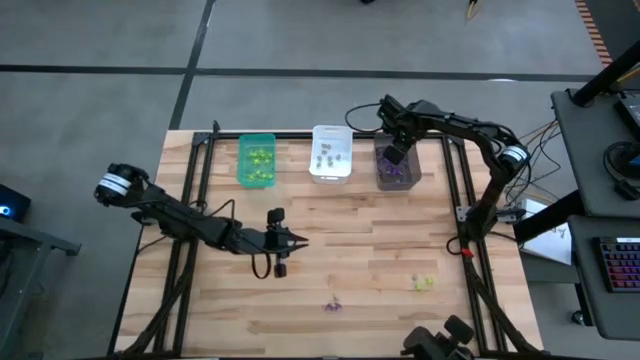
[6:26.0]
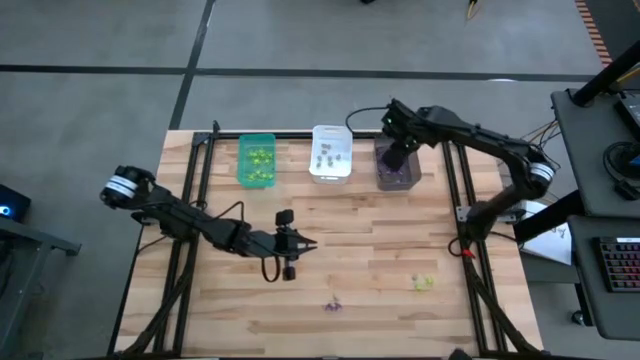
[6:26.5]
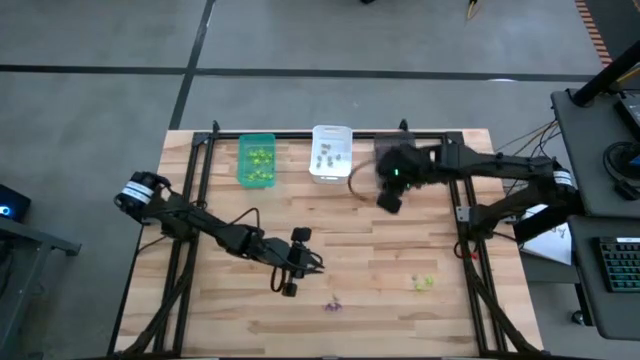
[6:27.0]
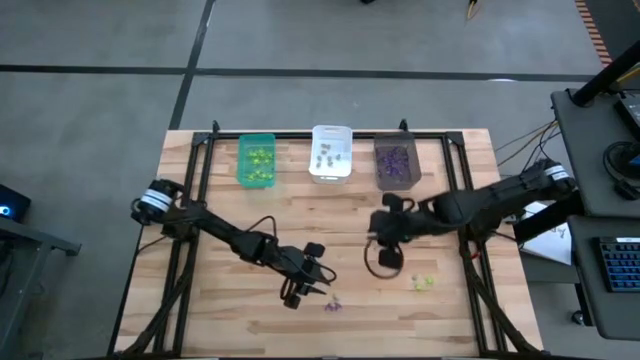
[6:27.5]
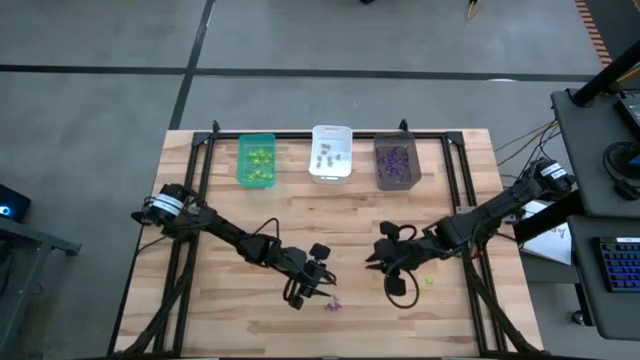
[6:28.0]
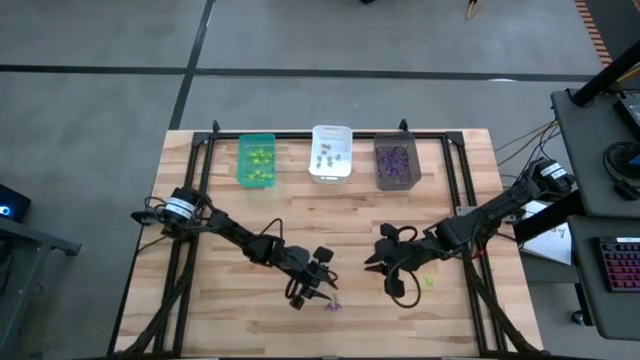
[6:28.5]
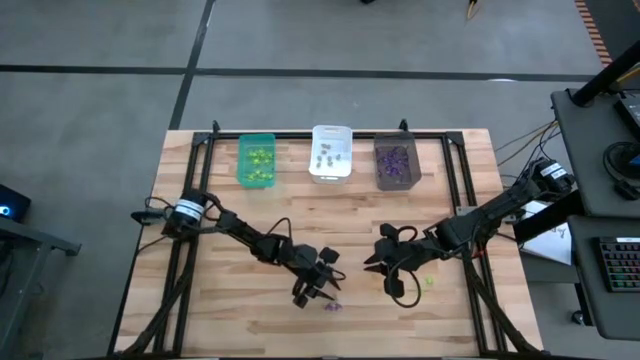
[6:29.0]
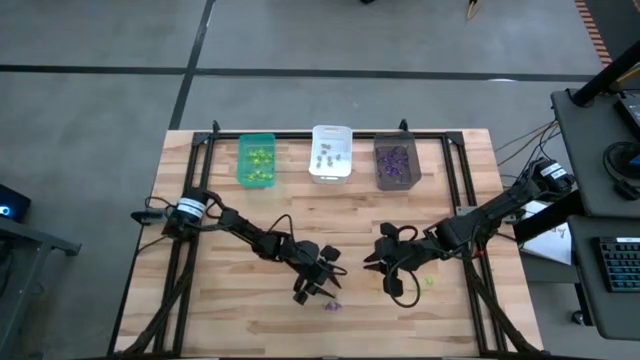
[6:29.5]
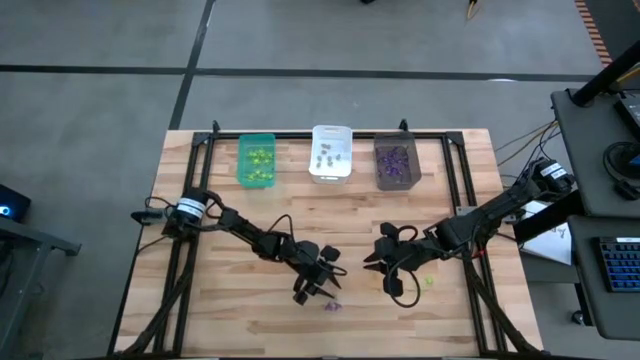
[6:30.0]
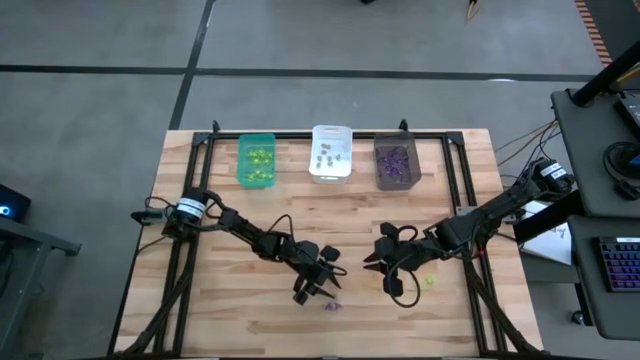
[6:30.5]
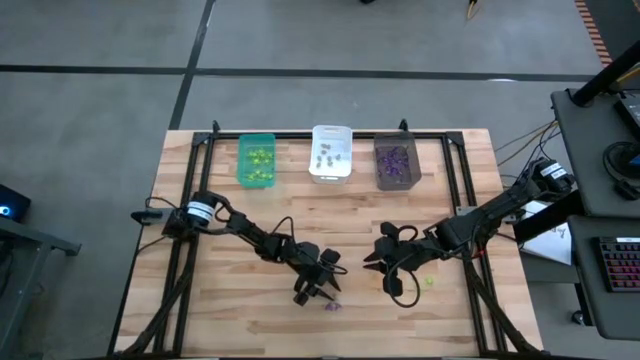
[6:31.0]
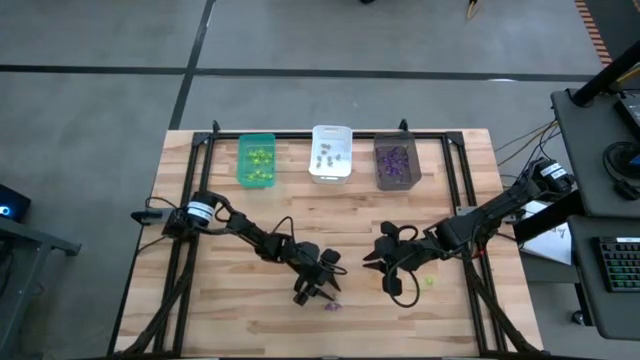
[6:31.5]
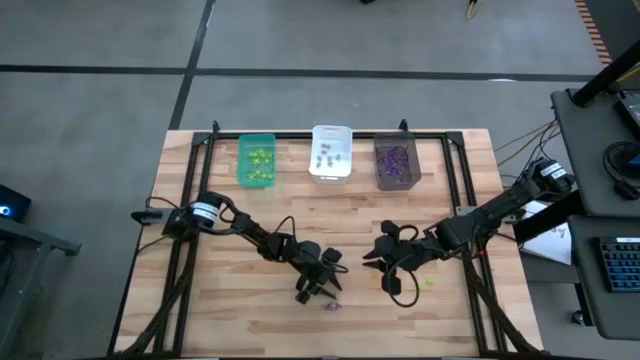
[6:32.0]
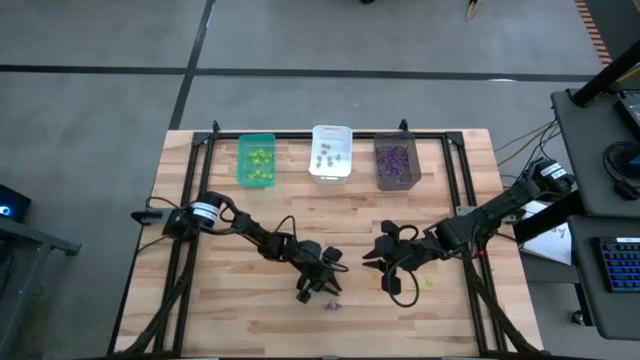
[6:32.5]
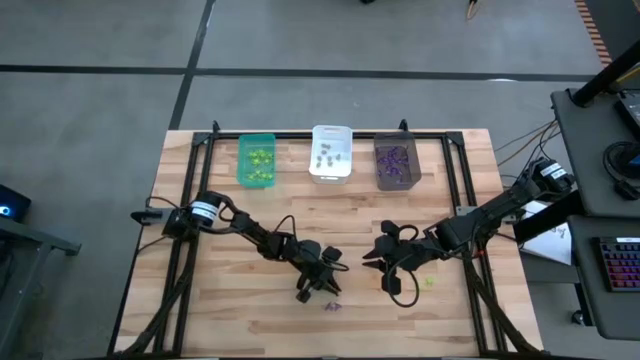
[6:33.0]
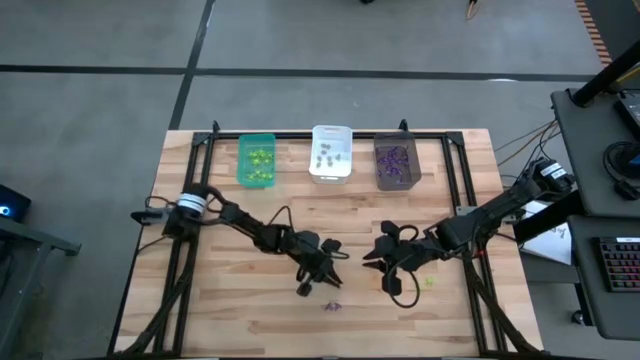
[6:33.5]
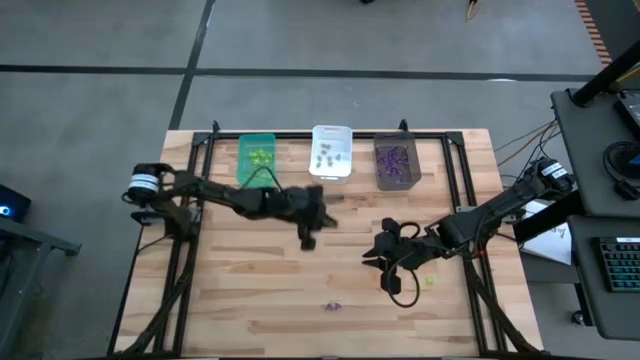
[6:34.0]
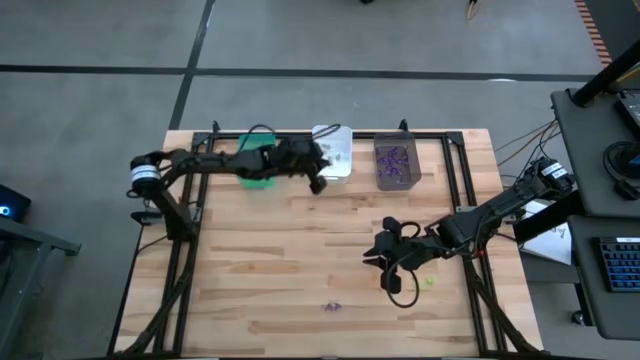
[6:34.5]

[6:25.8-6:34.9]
Task: Sort Halloween decoration
Put the white skull toy into the white bin

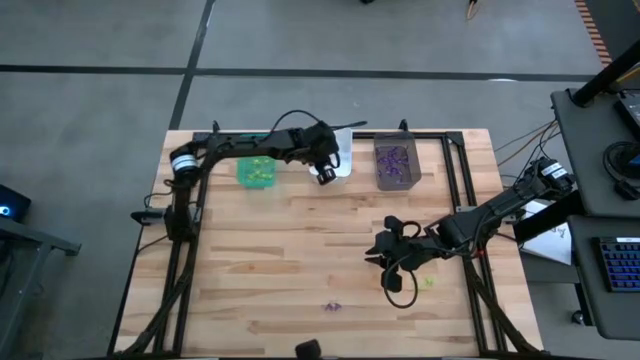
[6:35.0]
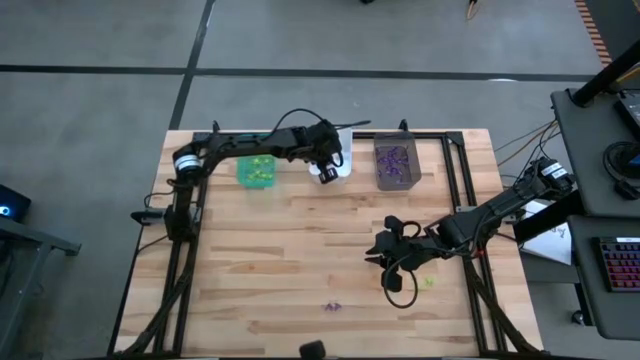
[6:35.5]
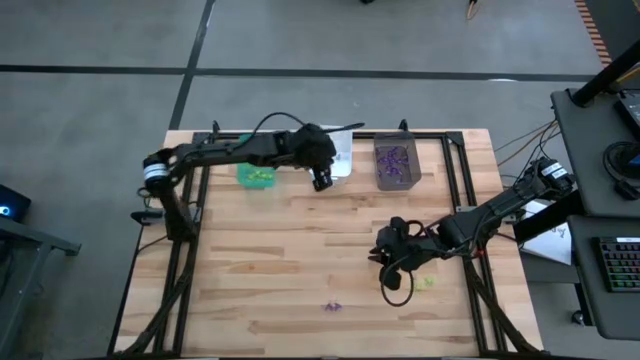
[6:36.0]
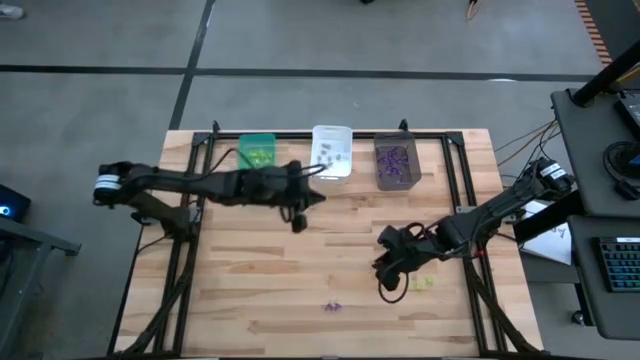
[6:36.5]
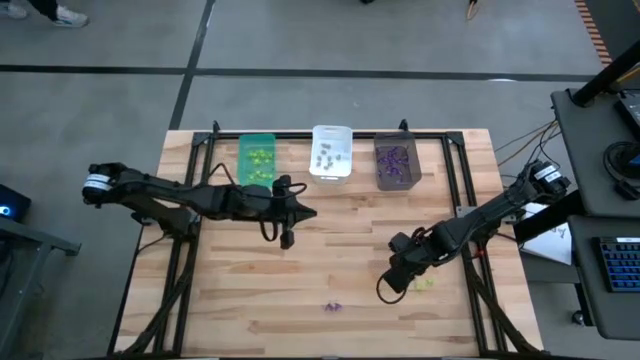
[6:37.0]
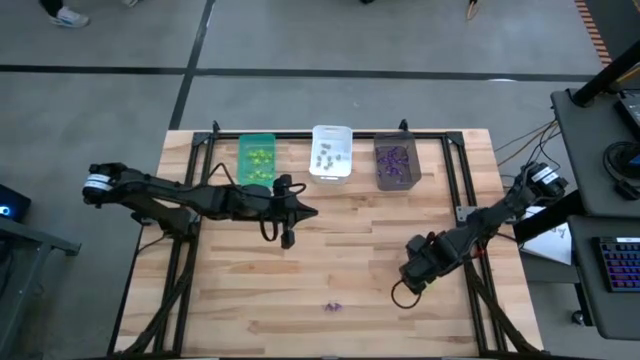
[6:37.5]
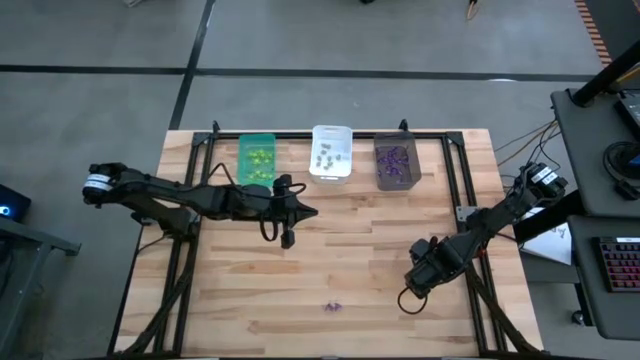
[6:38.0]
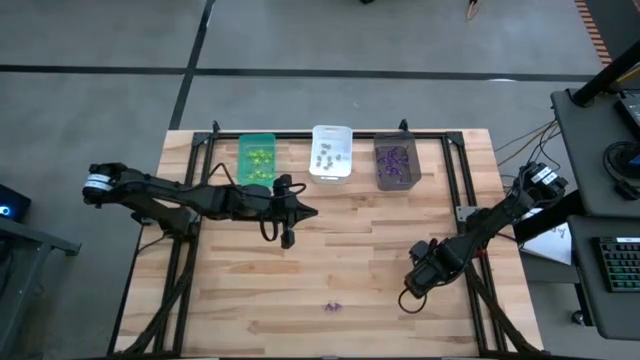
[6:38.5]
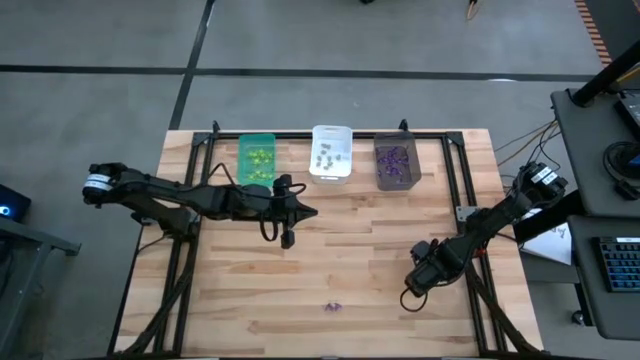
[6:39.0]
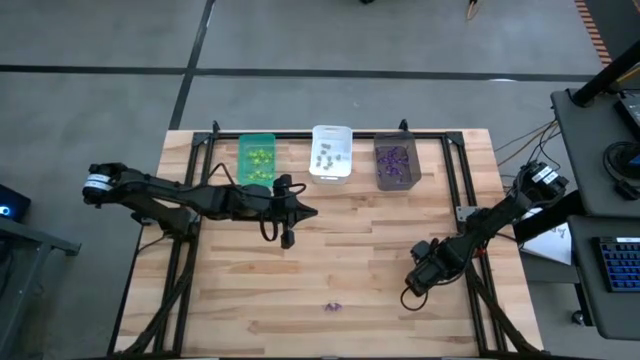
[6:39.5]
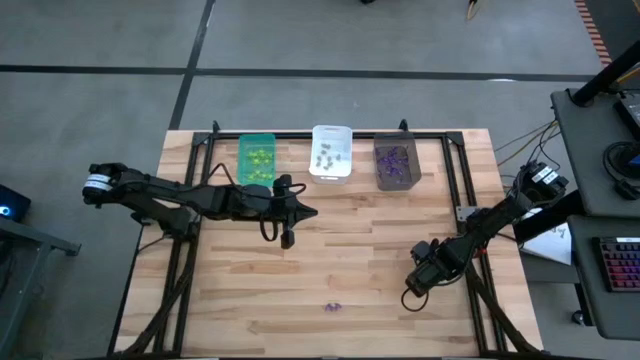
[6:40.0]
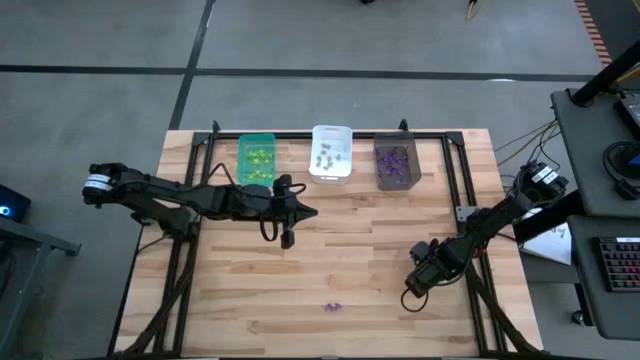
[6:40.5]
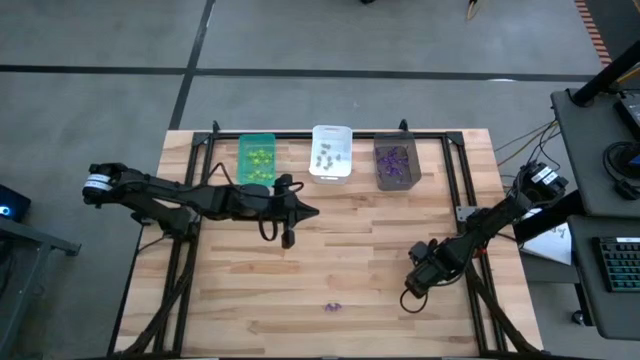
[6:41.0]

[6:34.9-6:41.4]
Put the green spider toy into the blue bin

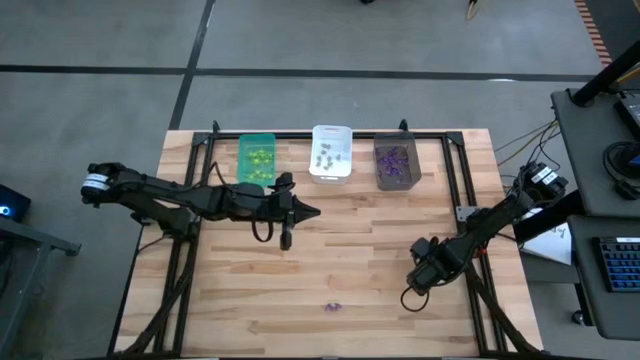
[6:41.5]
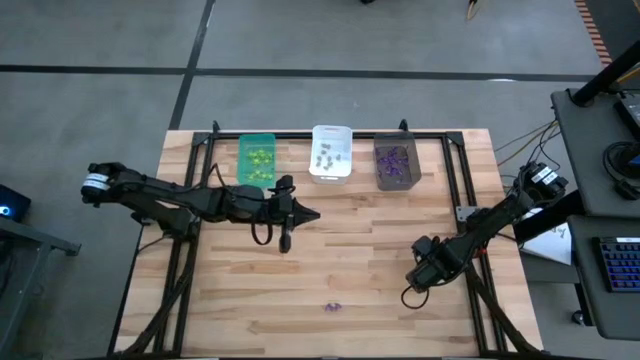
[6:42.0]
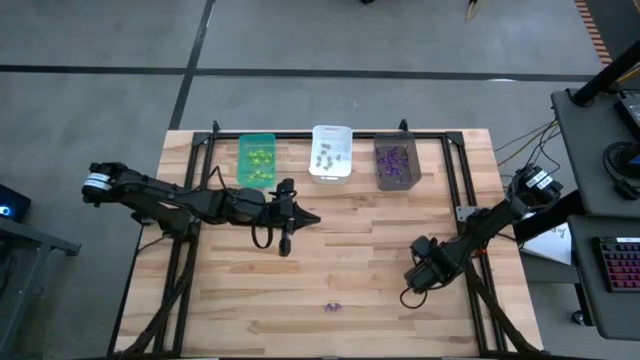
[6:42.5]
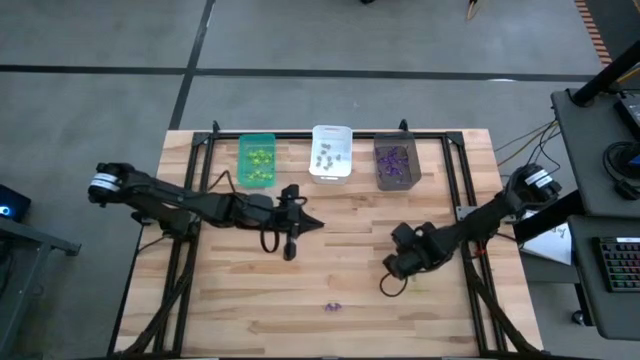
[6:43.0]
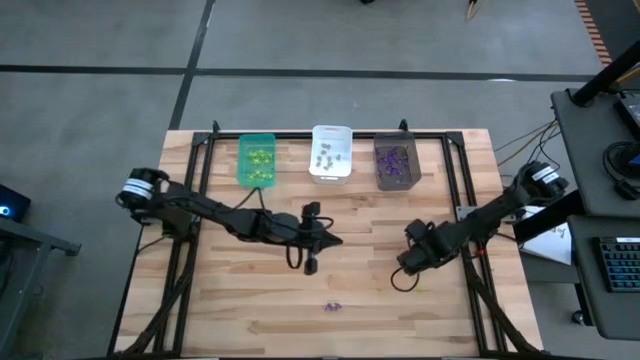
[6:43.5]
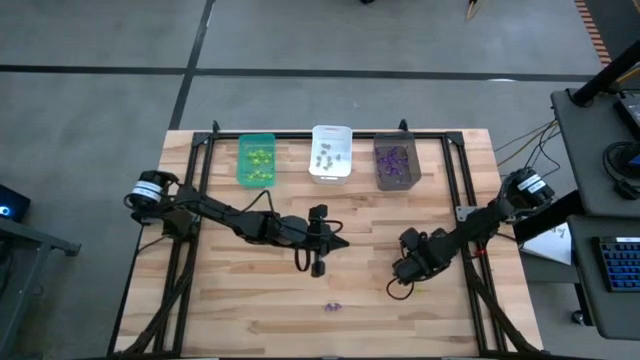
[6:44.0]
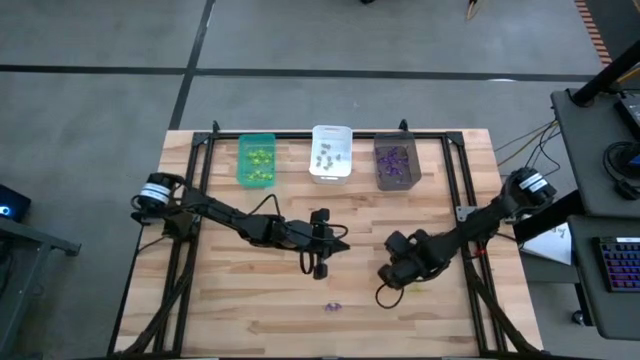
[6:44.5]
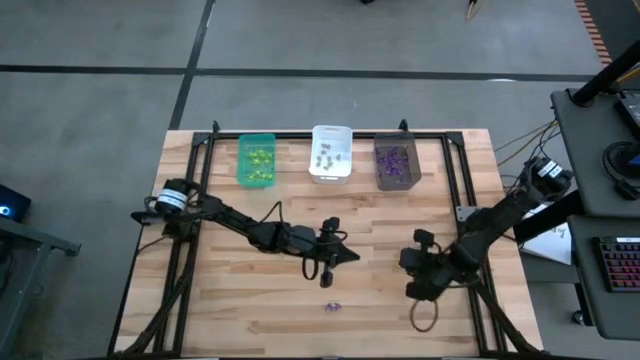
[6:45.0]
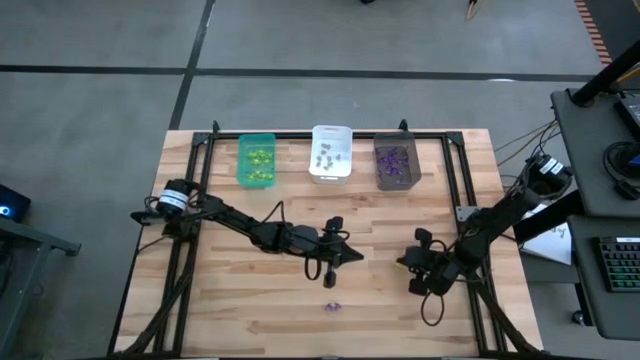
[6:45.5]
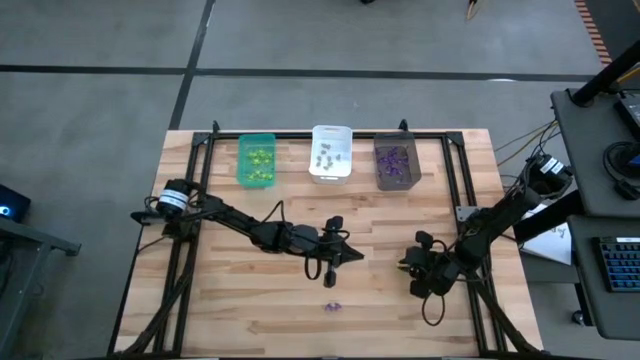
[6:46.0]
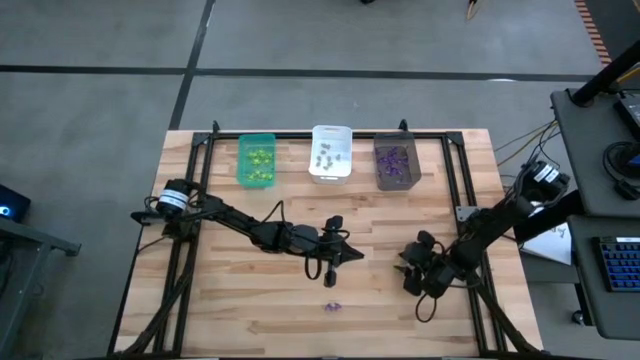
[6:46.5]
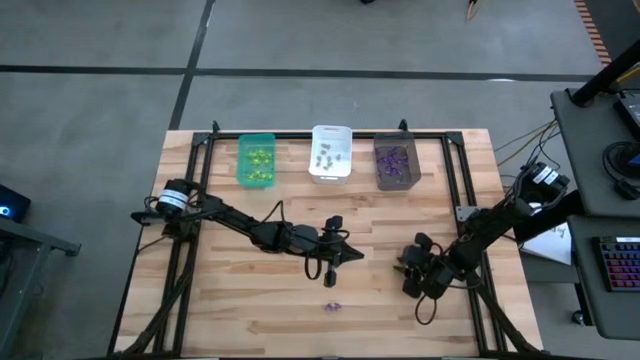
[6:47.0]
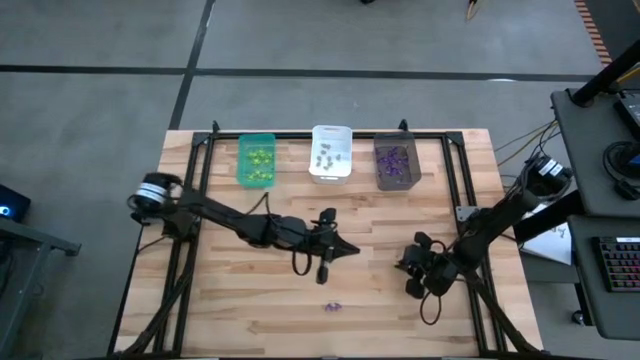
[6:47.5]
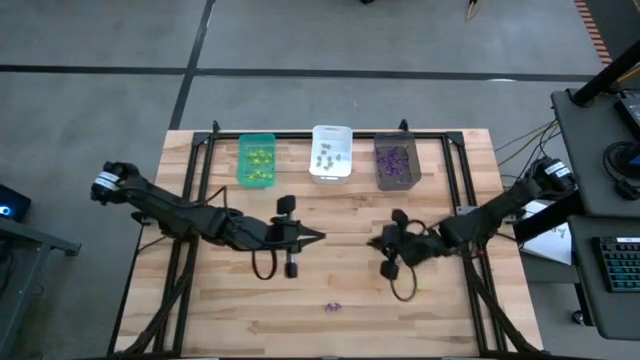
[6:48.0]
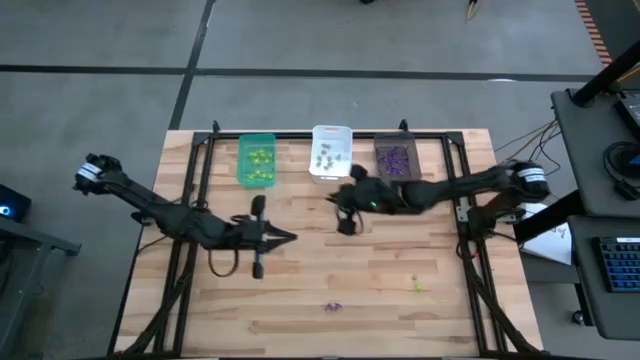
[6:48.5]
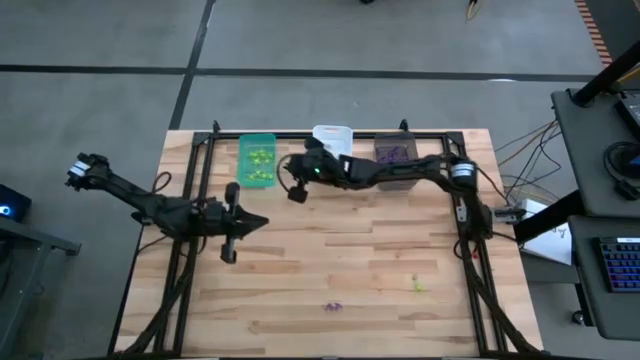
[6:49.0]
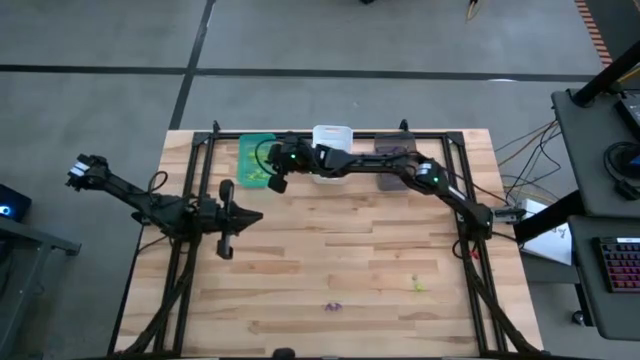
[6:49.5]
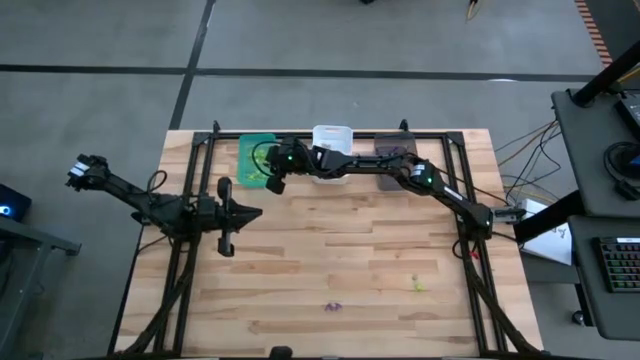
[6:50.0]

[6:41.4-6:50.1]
Put the green spider toy into the blue bin
